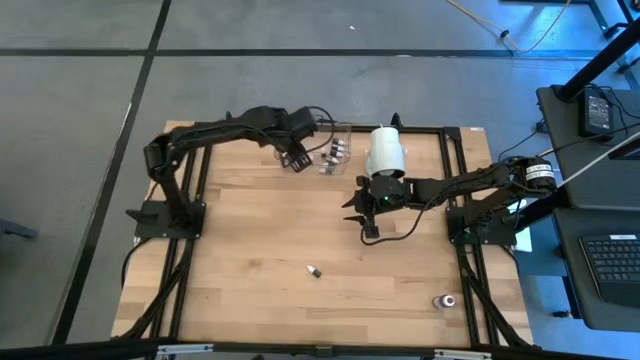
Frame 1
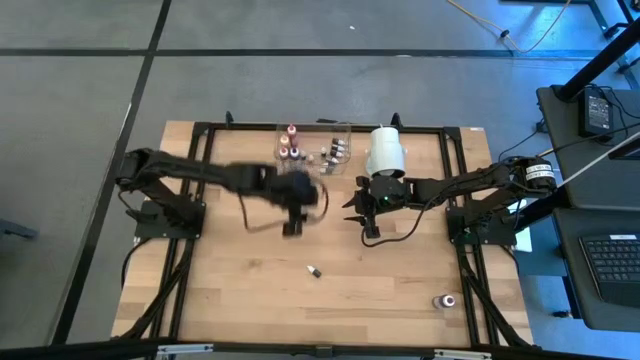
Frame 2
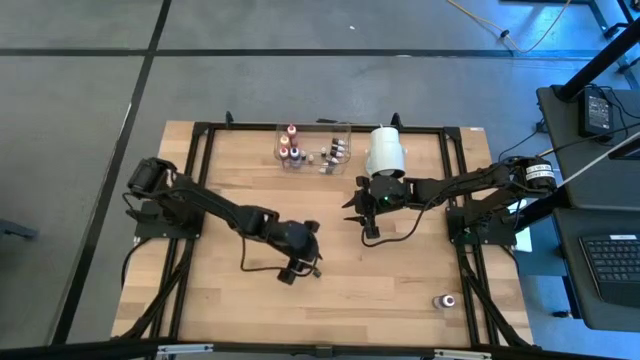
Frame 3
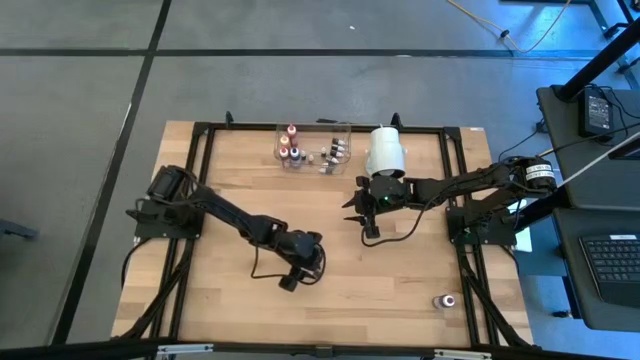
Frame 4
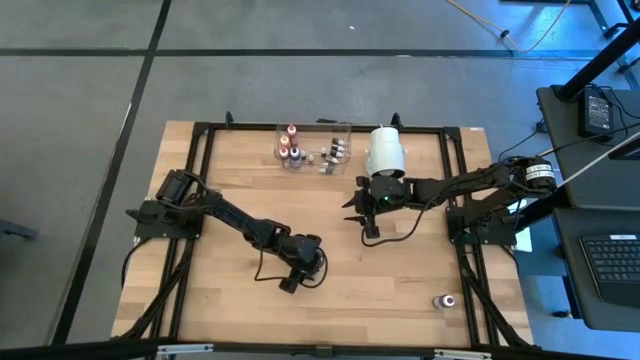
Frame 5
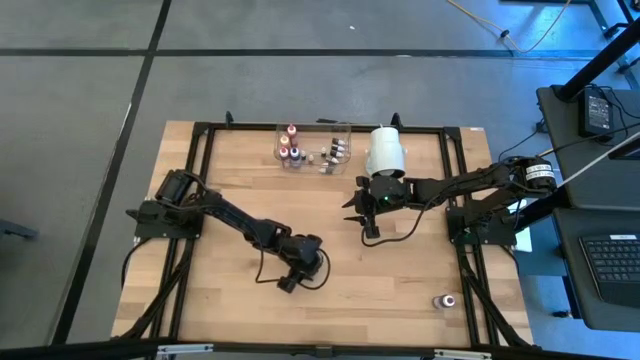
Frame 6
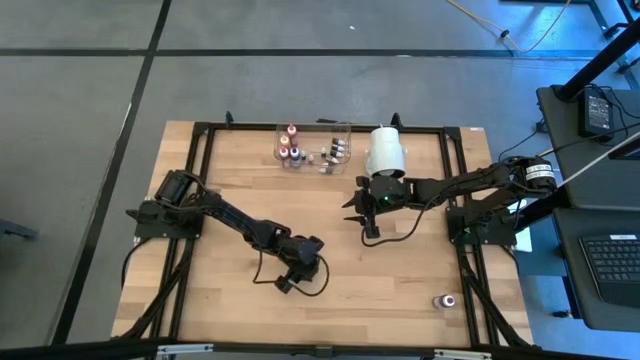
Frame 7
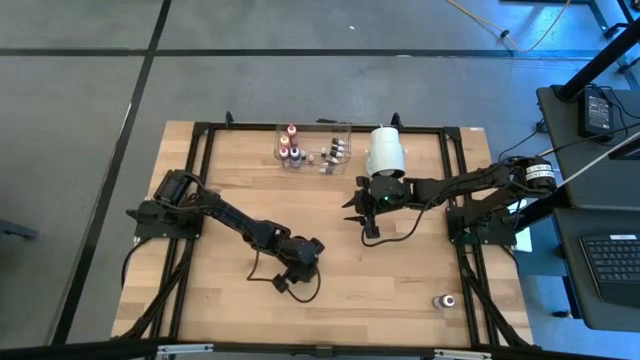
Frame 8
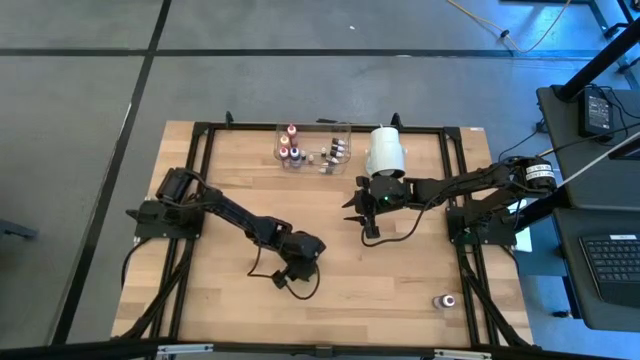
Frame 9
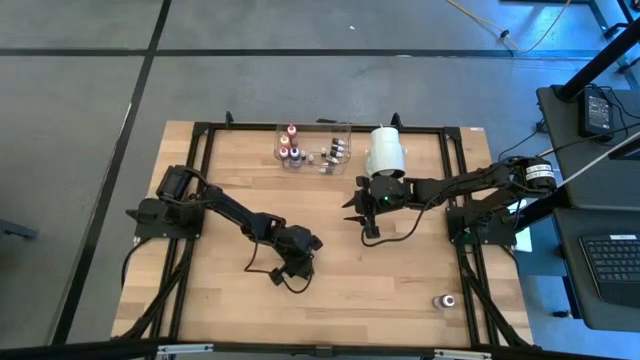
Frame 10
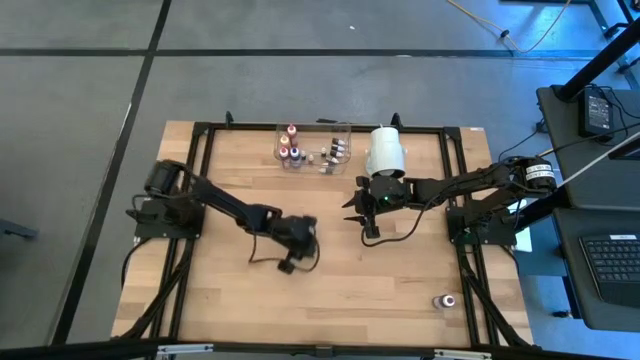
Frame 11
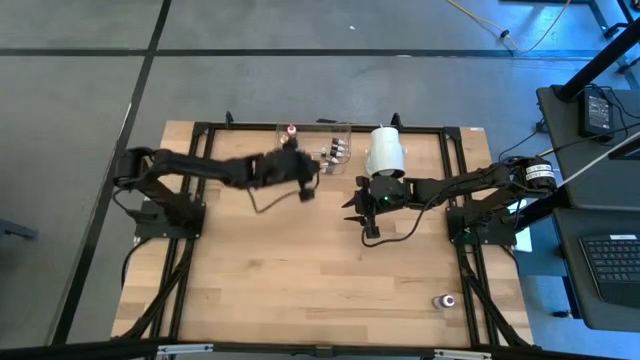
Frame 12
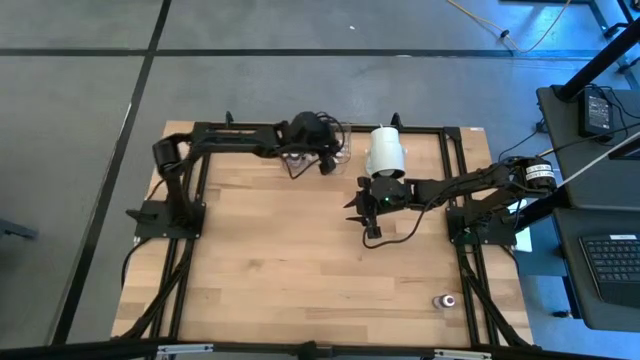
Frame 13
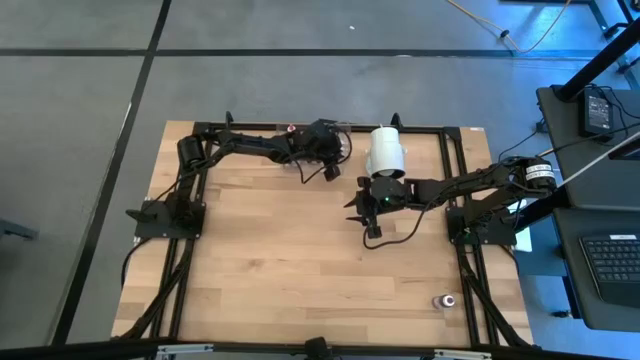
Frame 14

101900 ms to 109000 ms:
Task: Pick & Place food coloring
Put the green food coloring bottle into the transparent bin

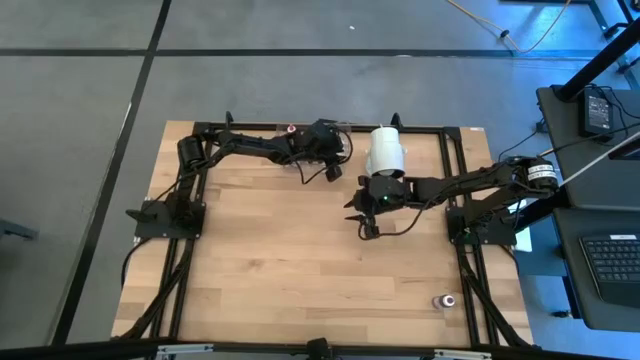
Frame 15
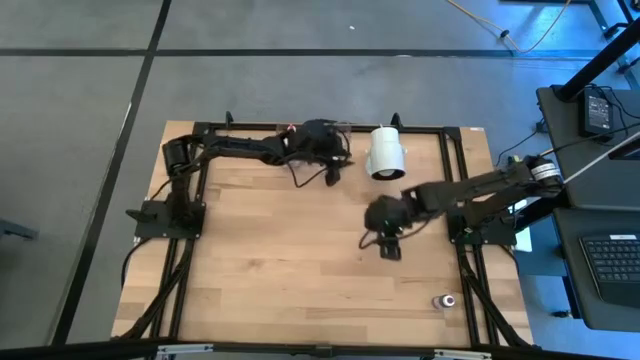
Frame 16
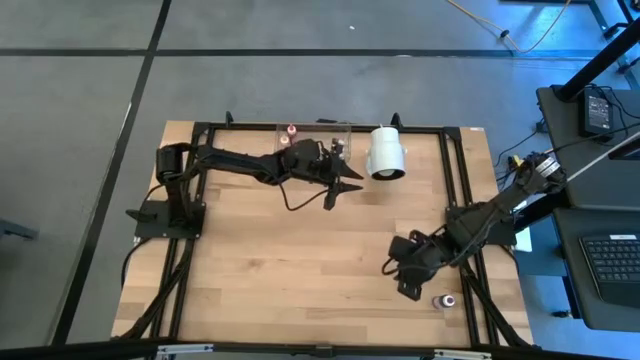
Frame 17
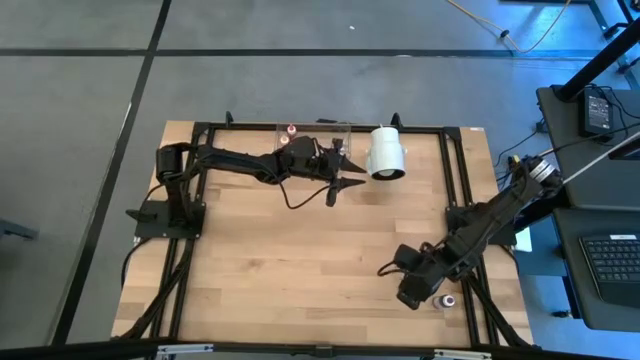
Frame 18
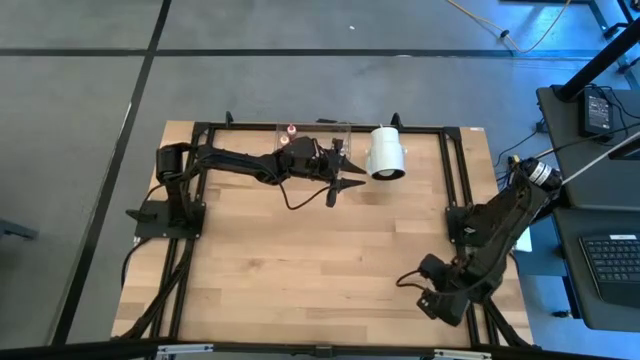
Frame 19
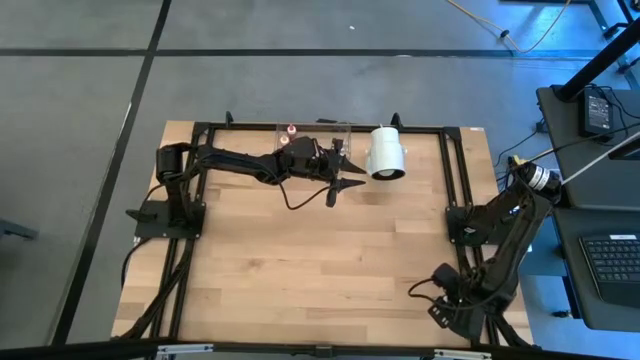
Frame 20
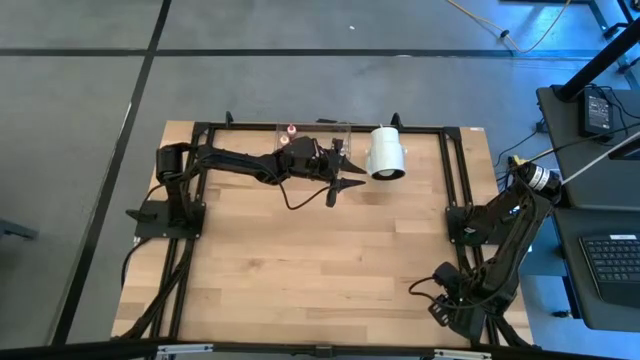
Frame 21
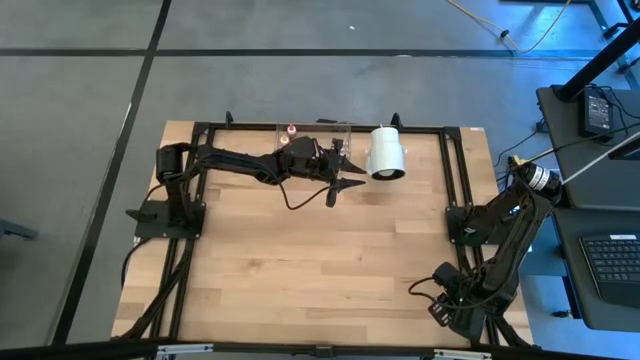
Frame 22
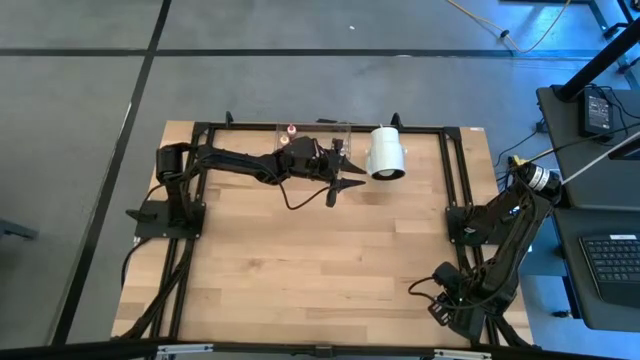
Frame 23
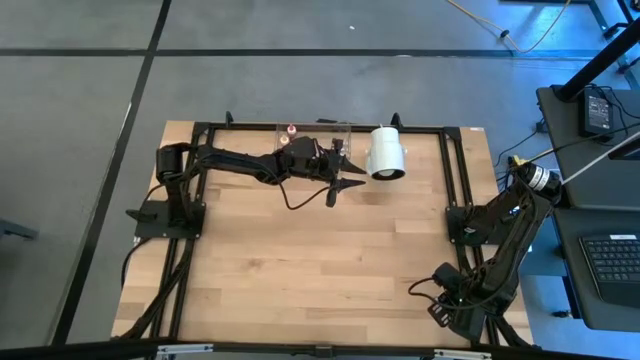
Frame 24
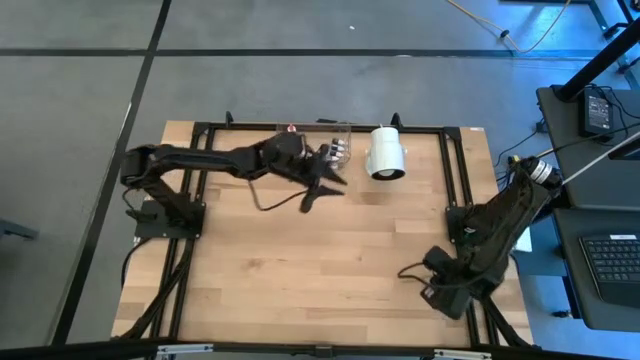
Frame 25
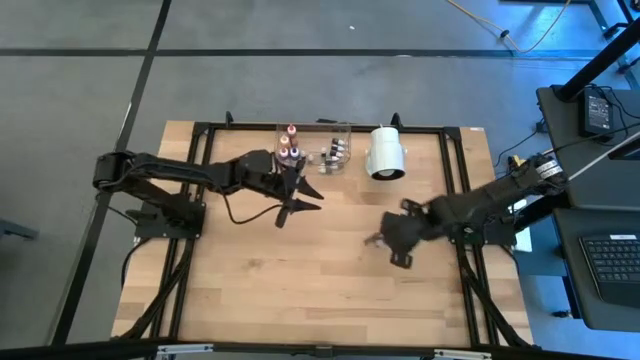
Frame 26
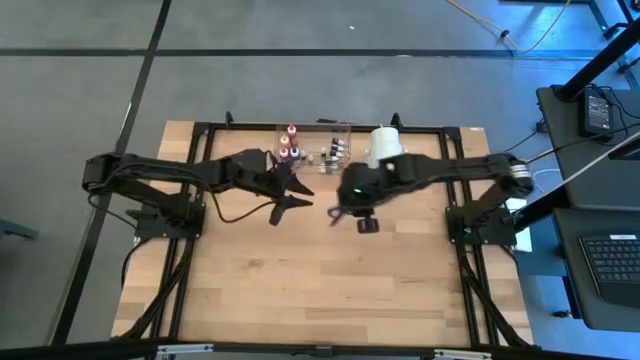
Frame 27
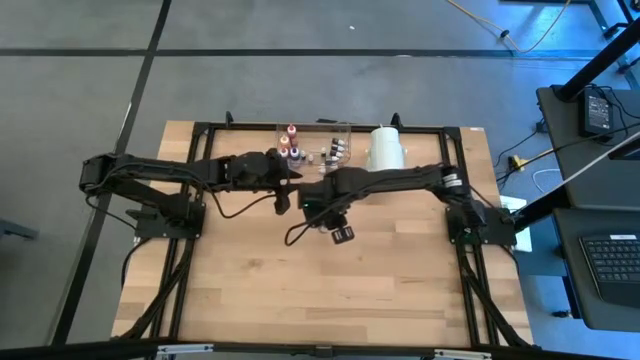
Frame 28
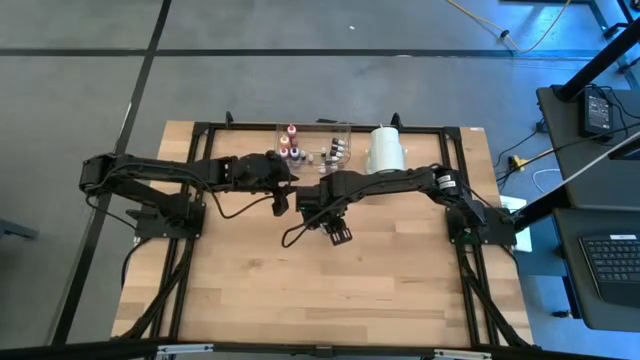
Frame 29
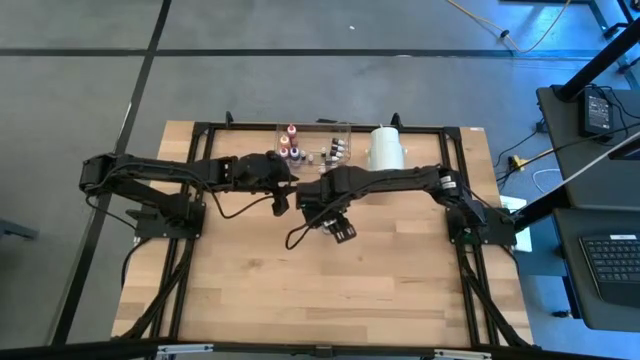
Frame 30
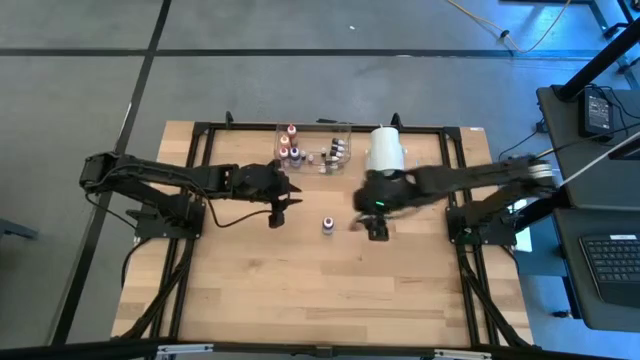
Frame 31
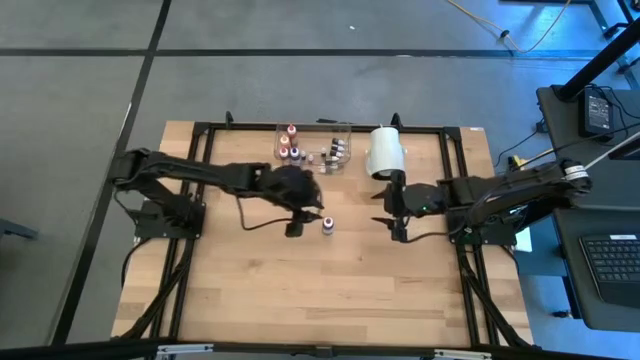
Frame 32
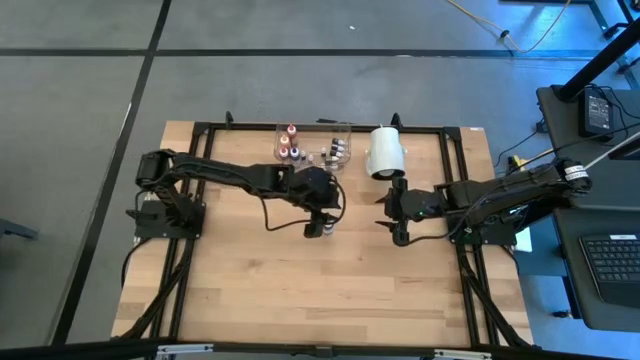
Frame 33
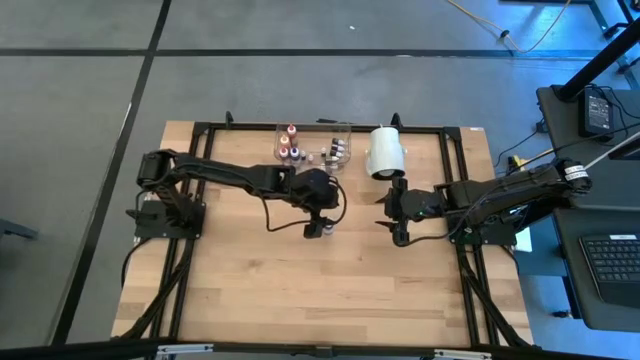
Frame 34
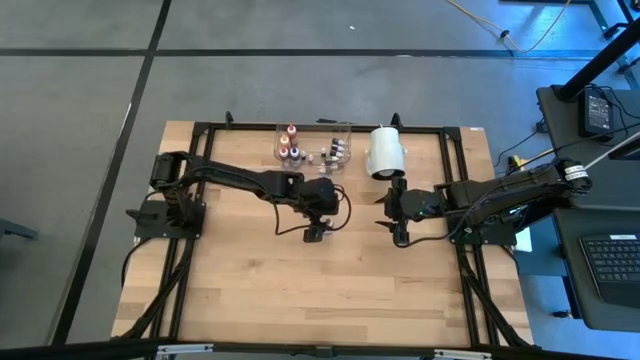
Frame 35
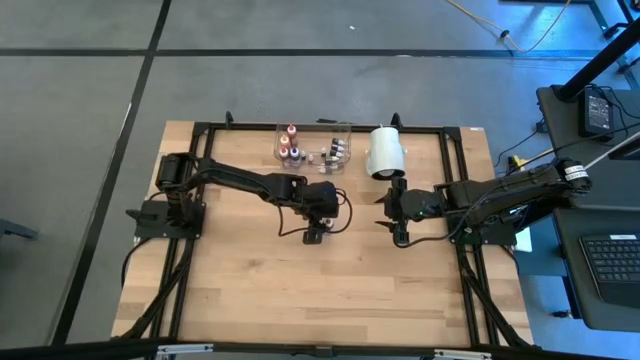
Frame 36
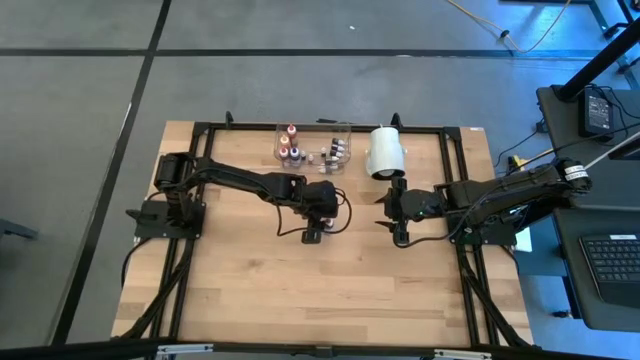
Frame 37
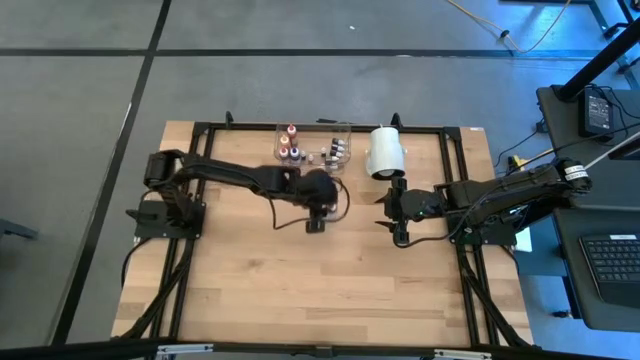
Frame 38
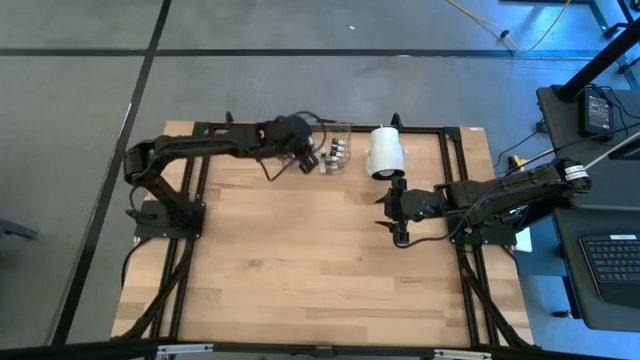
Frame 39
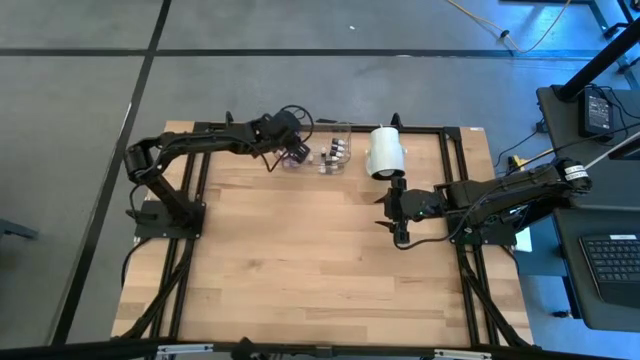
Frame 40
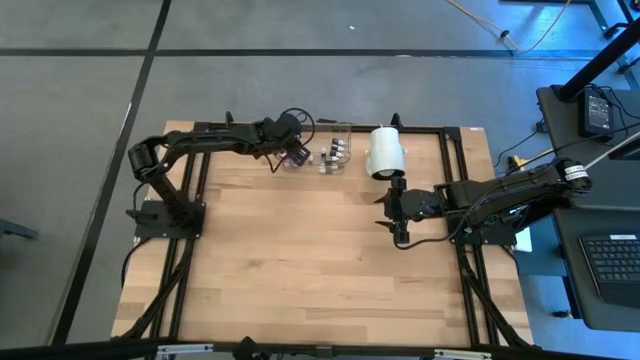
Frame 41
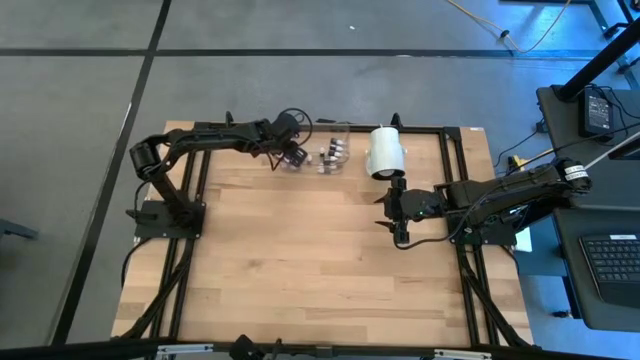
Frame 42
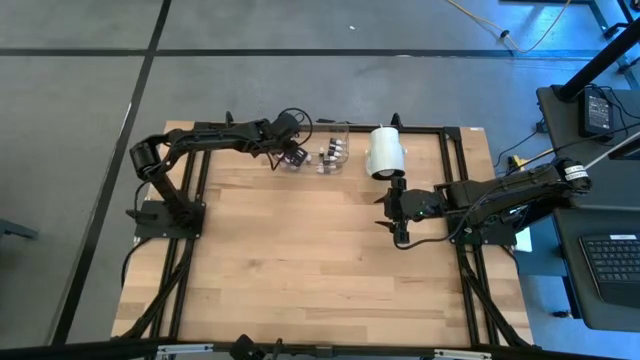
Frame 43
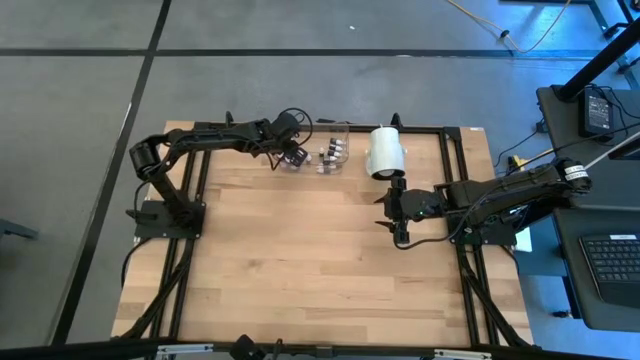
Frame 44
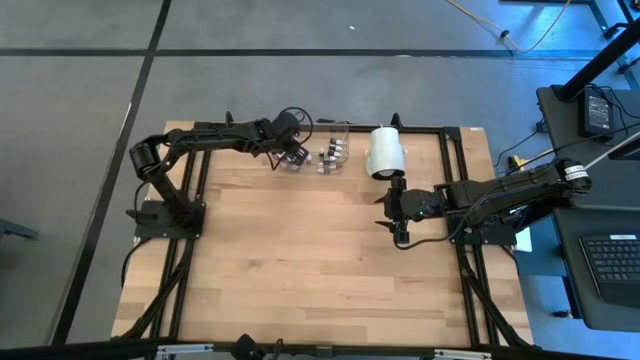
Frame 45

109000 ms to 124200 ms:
Put the purple food coloring bottle into the transparent bin
